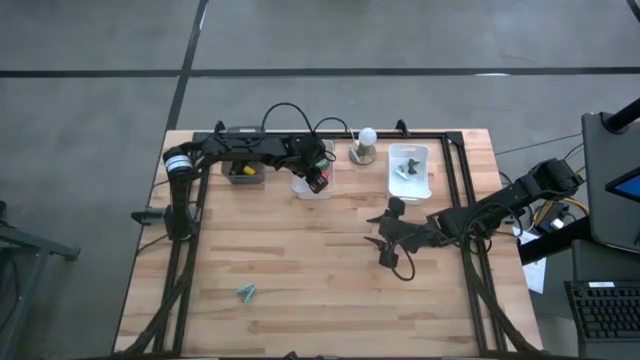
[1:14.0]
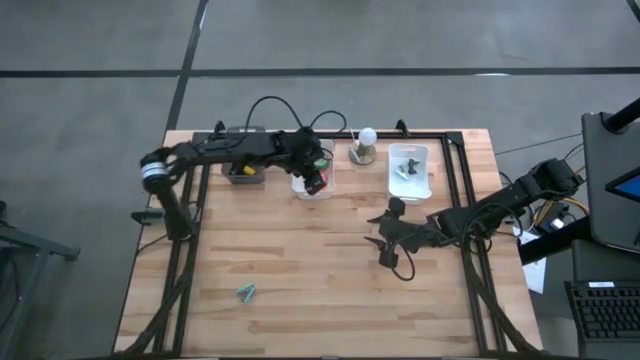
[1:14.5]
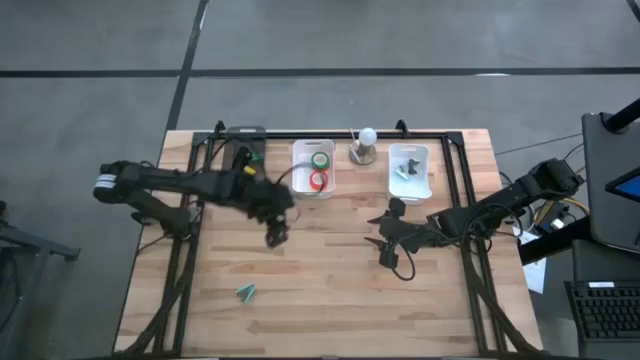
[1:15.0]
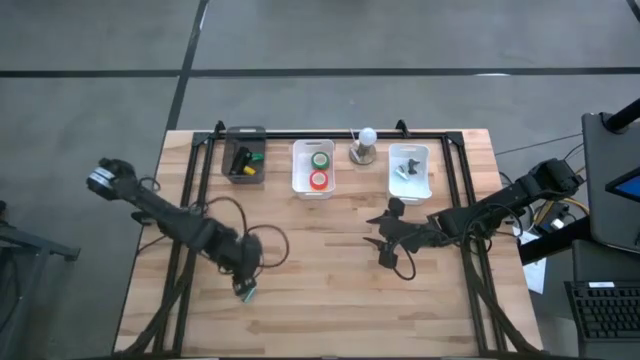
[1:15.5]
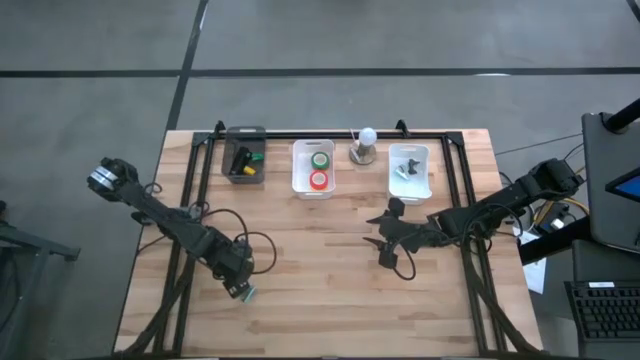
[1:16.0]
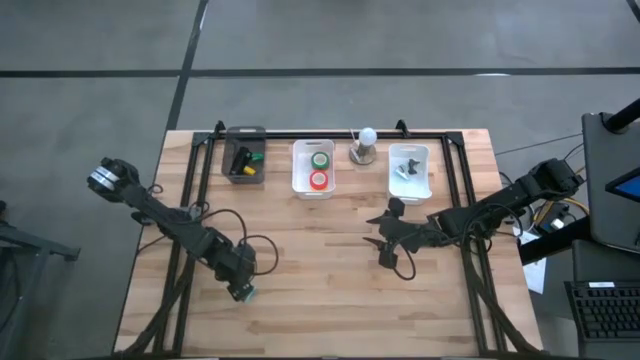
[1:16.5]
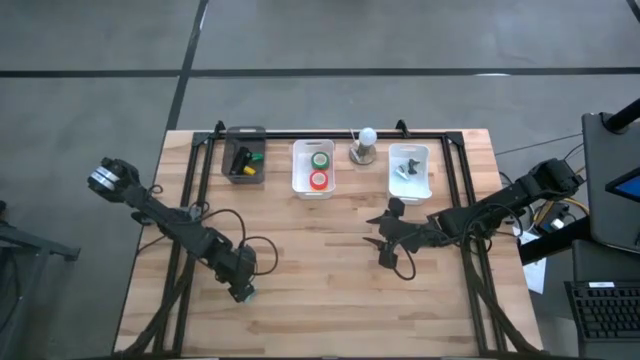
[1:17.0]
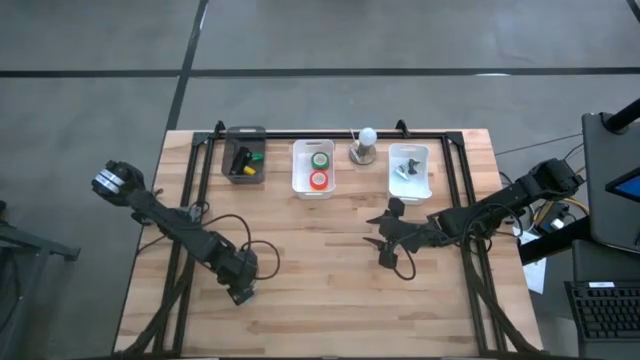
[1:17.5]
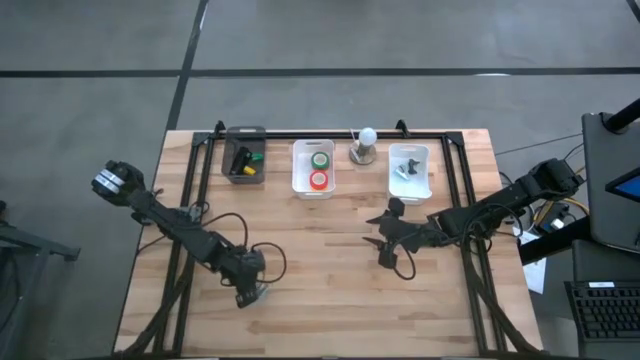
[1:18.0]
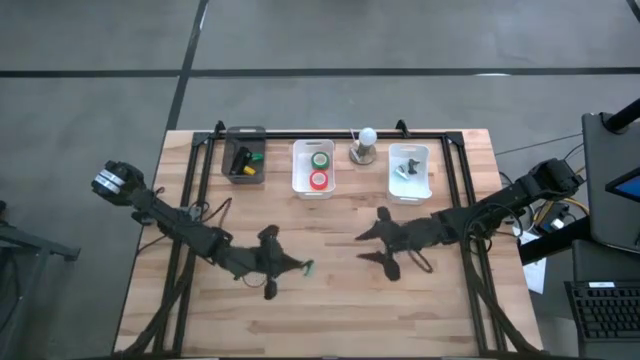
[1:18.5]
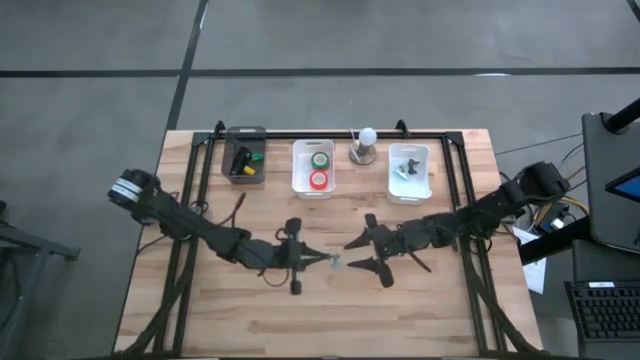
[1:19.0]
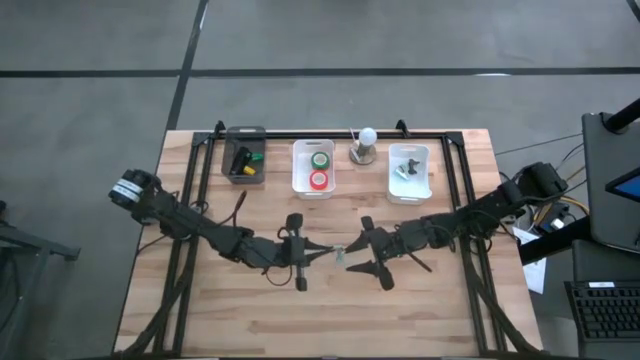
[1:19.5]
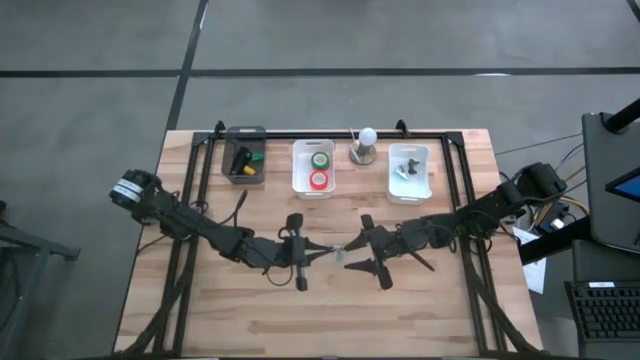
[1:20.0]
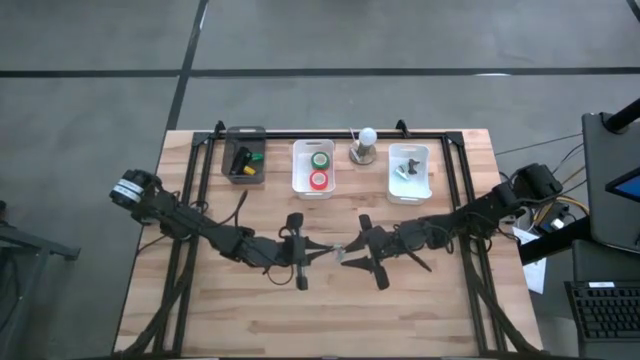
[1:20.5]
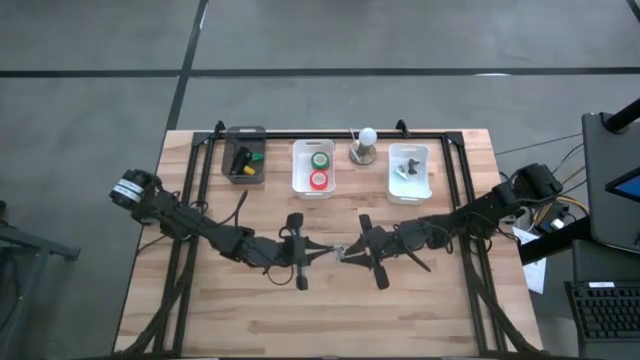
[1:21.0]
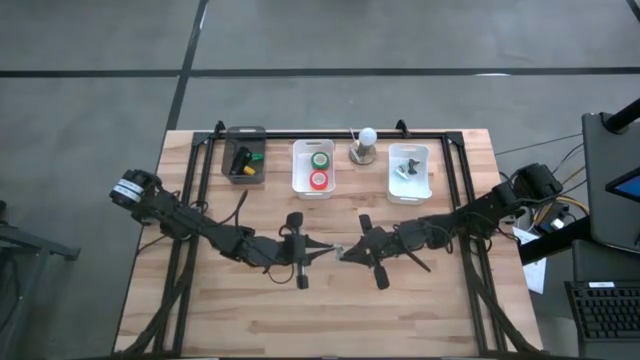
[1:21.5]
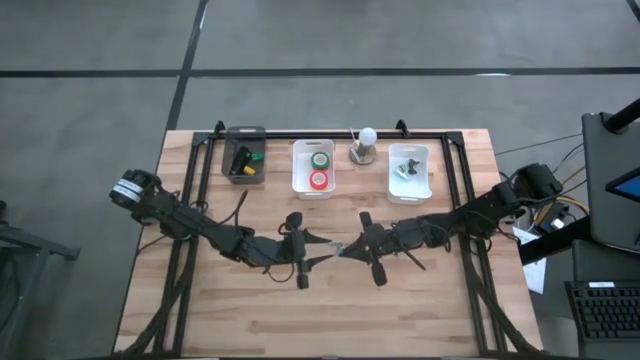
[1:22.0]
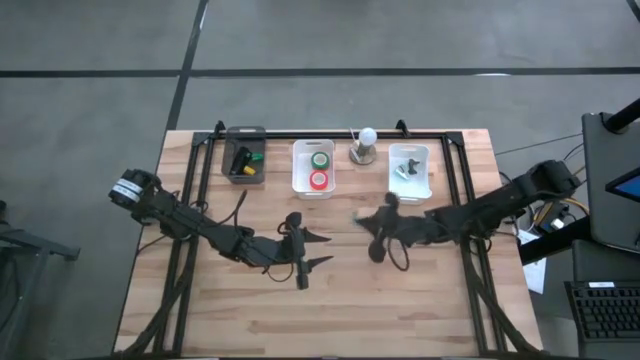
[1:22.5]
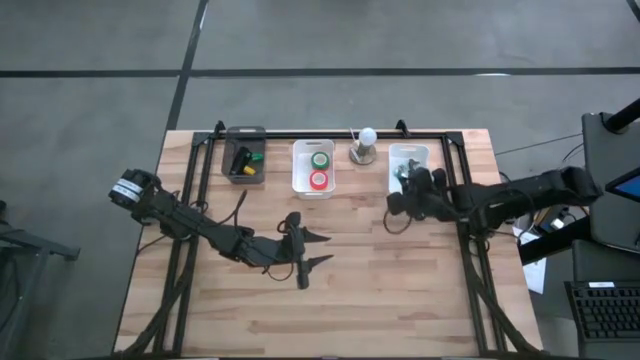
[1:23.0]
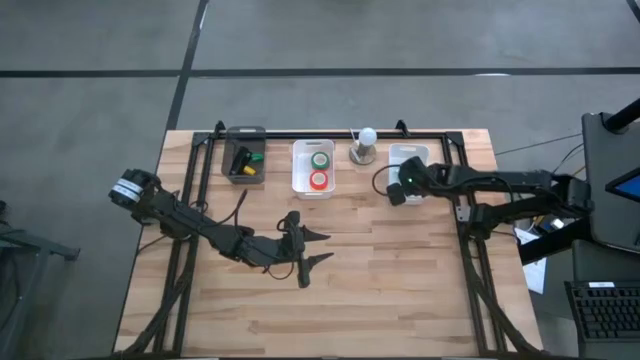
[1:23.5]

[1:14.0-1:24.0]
Task: Pick and place Stapler, Stapler remover, tape
Put the light blue staple remover into the right white bin

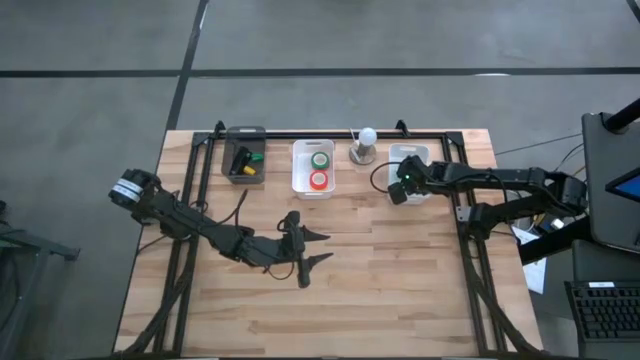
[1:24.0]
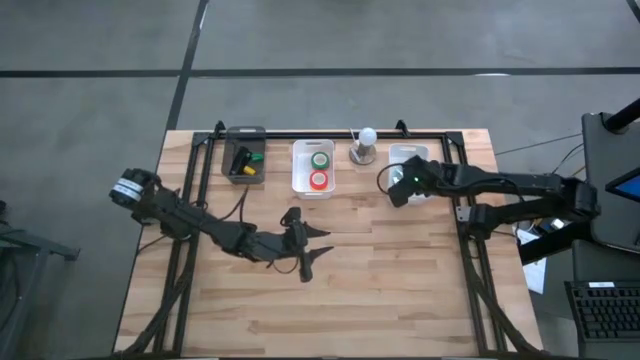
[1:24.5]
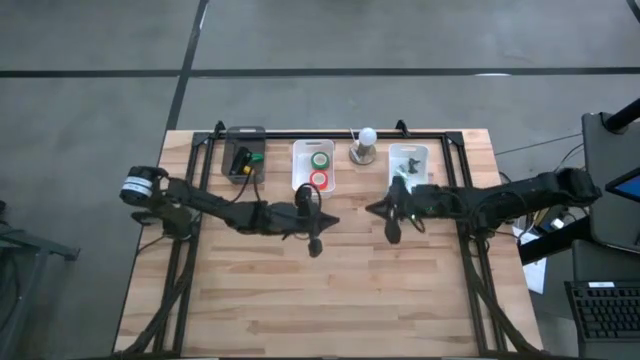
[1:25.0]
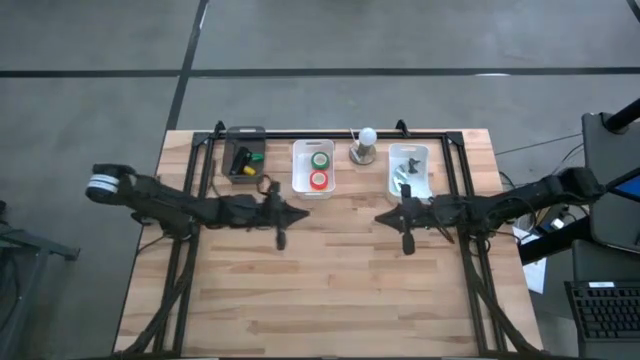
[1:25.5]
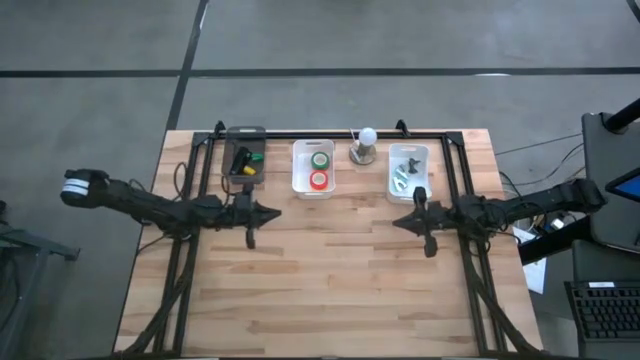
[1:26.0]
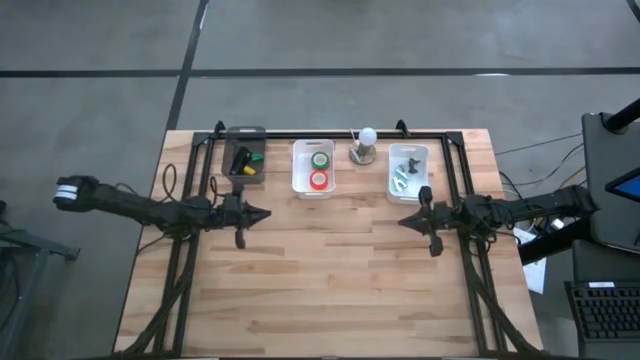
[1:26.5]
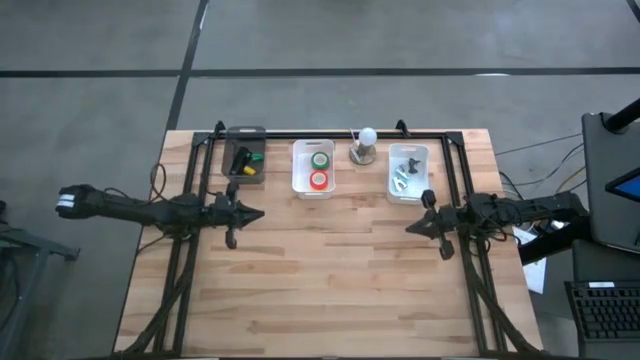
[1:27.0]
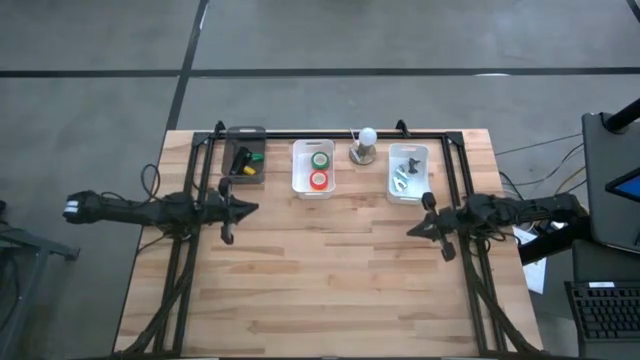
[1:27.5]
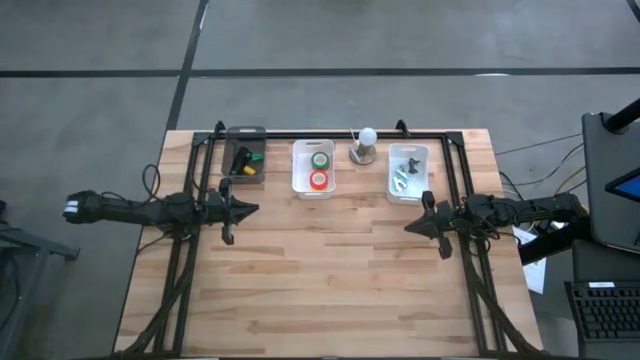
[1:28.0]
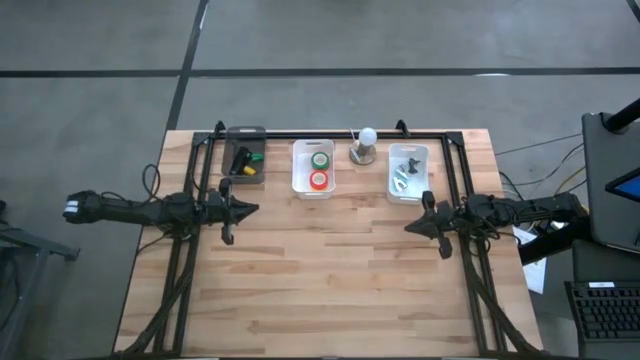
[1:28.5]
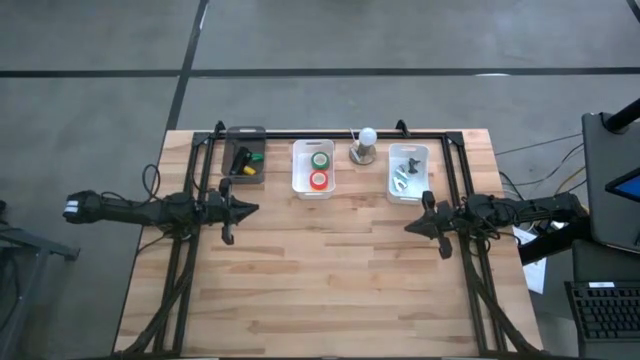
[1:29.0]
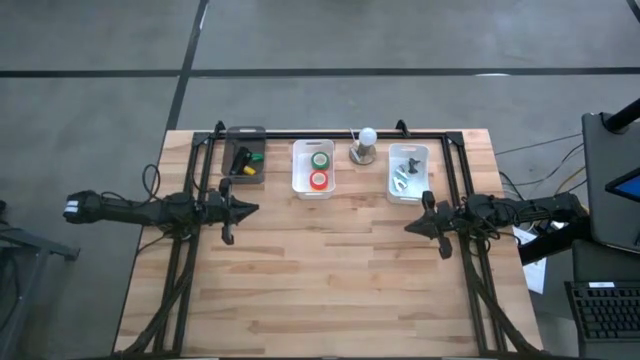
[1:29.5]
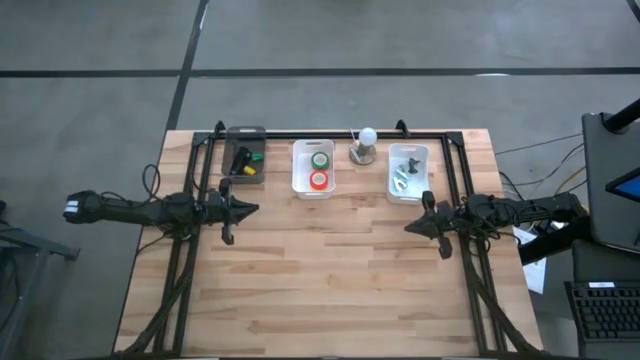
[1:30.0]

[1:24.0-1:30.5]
Return to Home Position

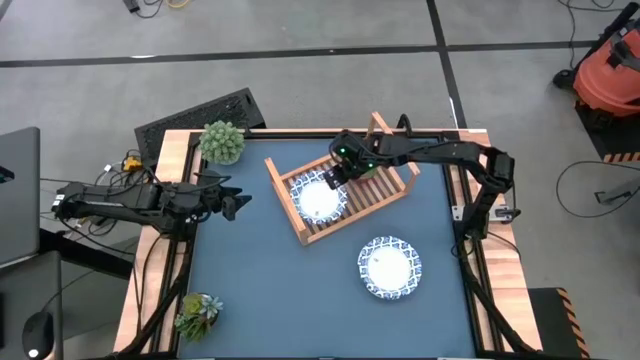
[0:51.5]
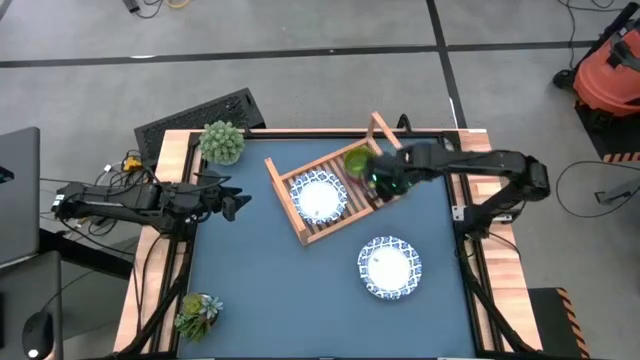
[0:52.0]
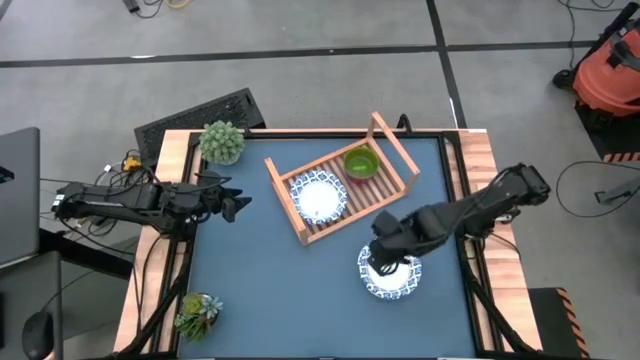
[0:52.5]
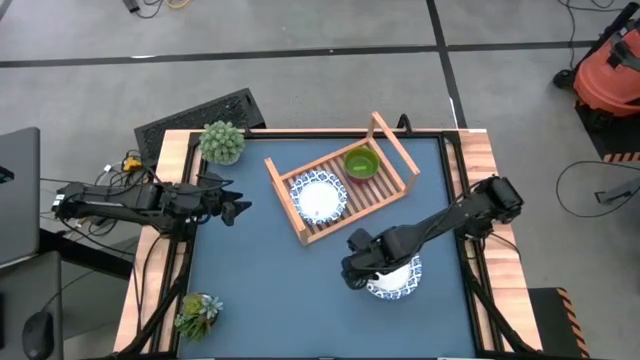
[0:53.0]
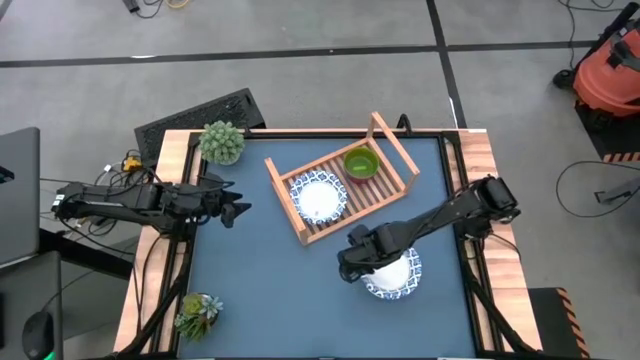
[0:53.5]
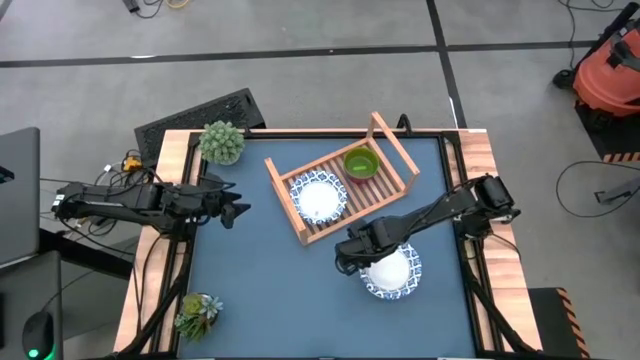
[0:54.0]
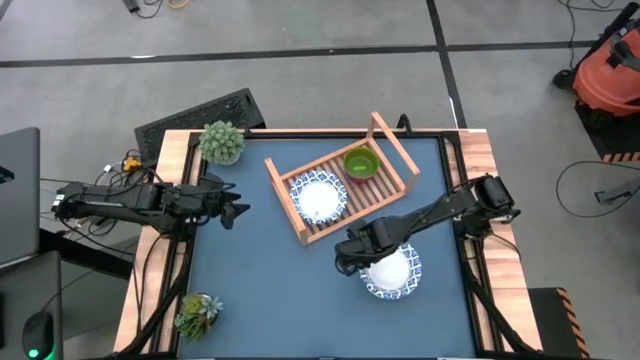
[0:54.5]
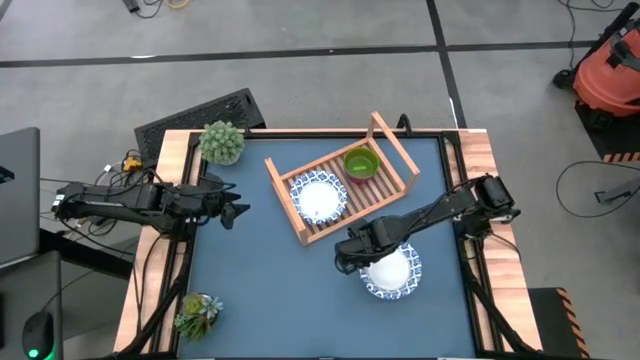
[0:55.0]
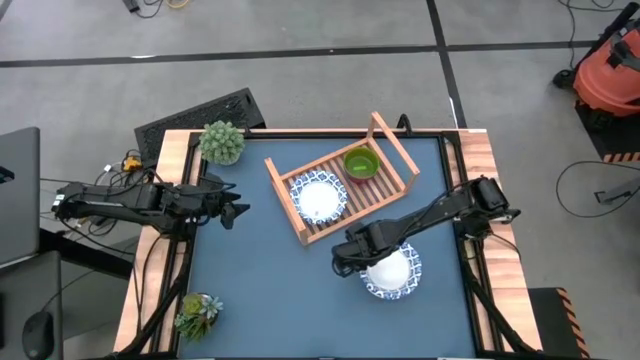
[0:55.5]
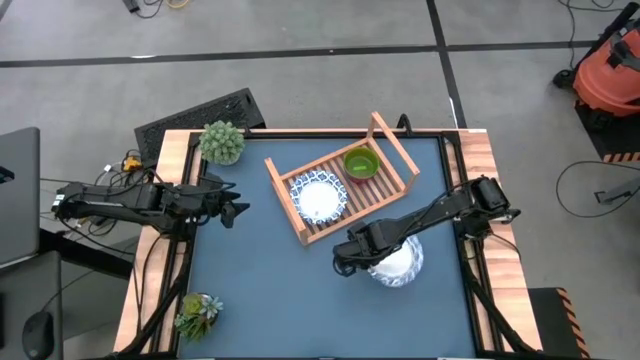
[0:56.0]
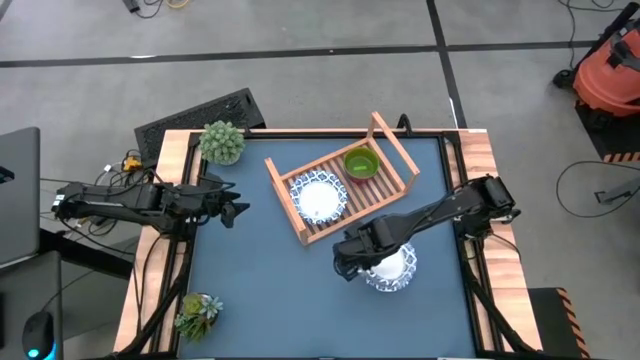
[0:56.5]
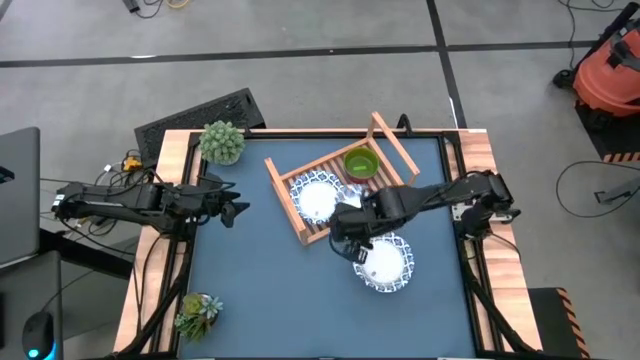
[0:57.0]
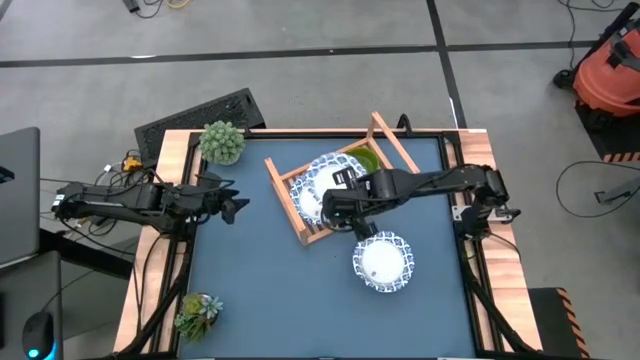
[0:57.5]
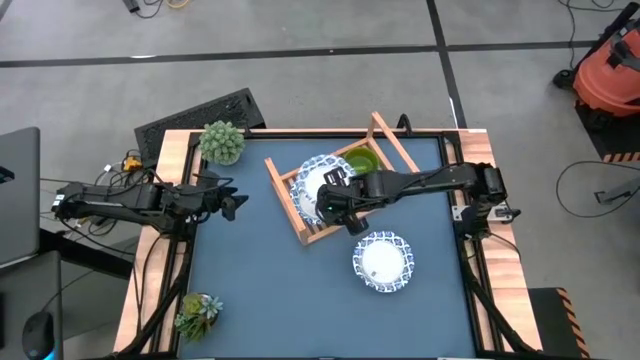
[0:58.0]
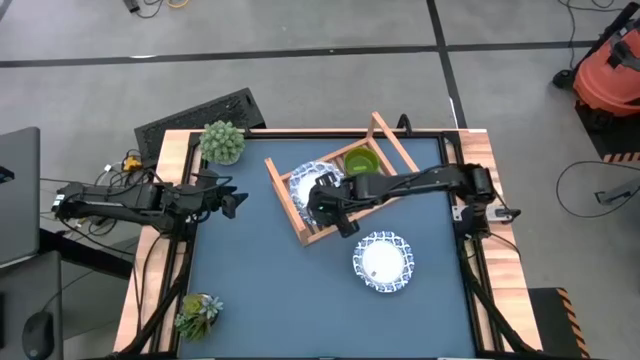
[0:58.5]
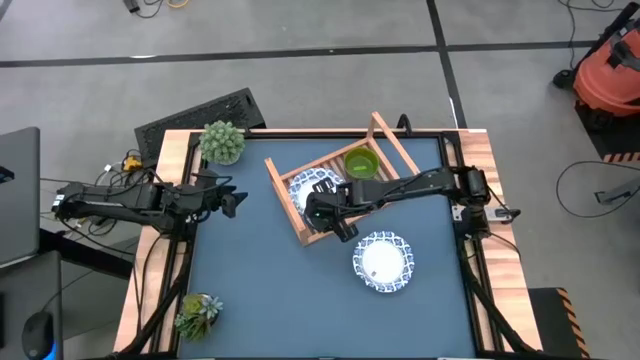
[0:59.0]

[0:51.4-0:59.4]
Task: Place and stack bowls onto a shelf
Stack the blue patterned bowl on top of the blue patterned bowl on the shelf
